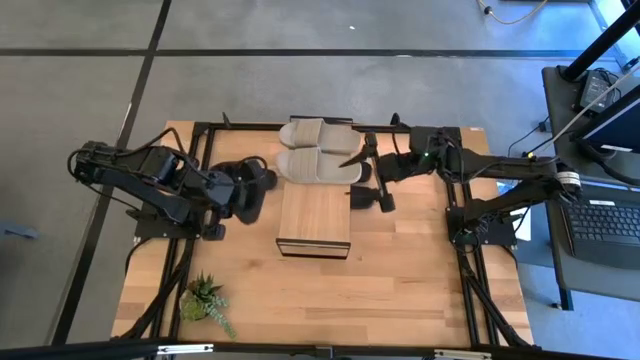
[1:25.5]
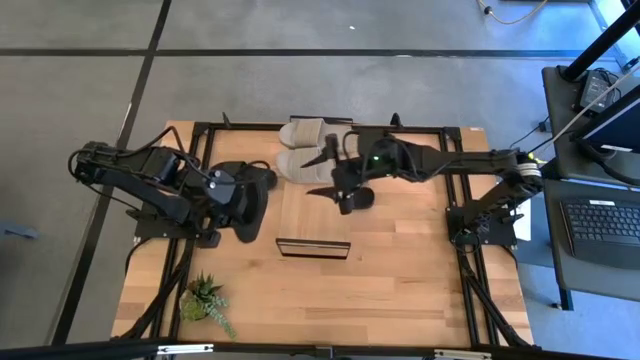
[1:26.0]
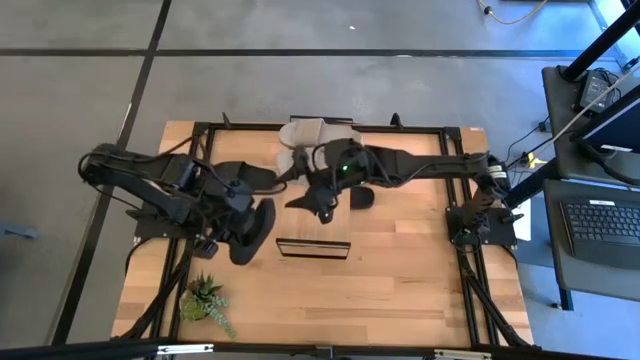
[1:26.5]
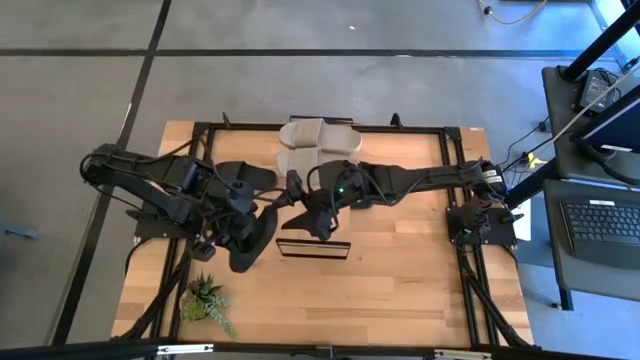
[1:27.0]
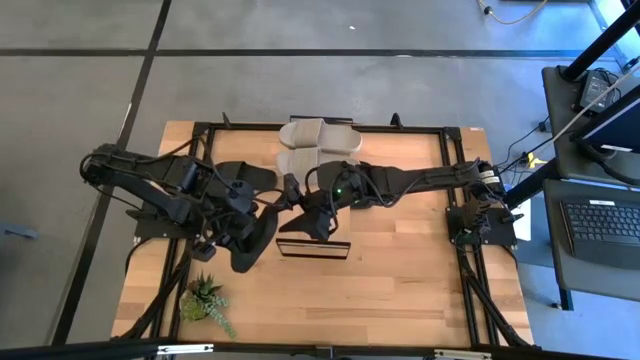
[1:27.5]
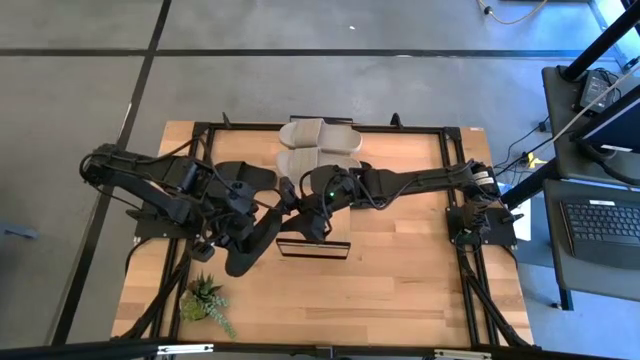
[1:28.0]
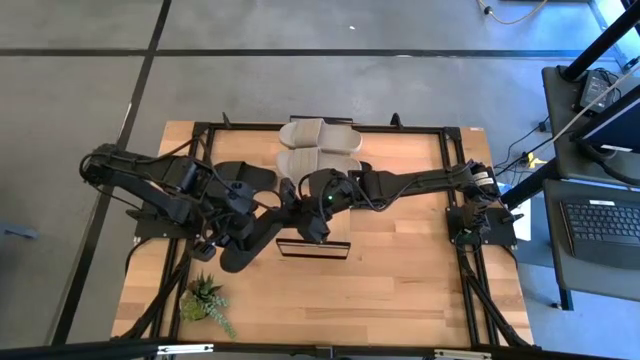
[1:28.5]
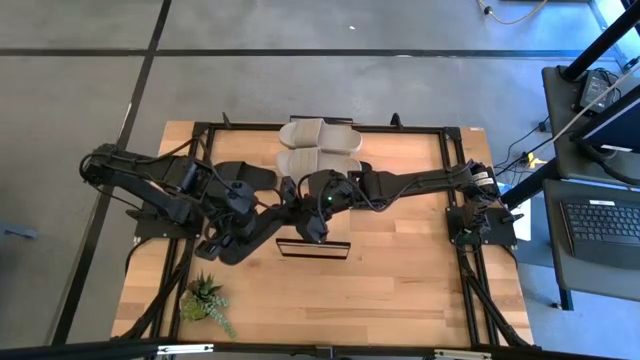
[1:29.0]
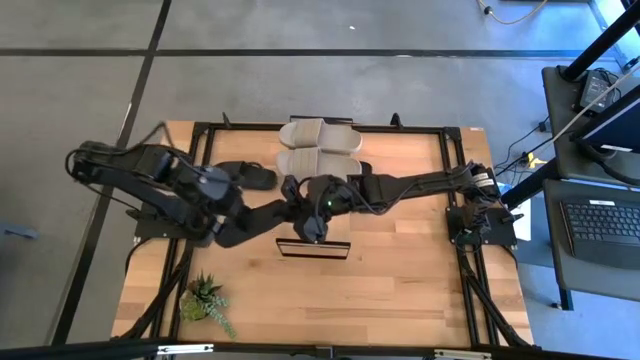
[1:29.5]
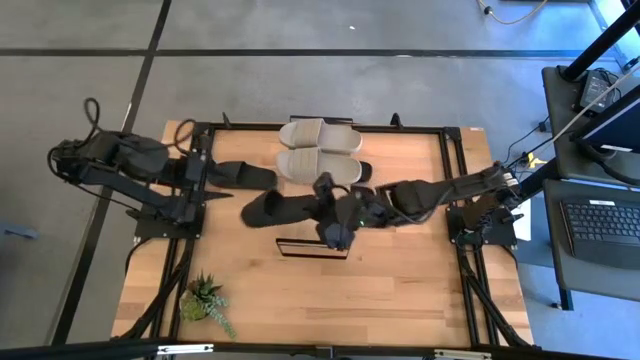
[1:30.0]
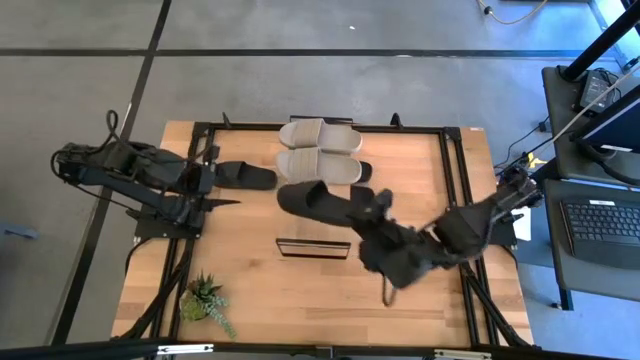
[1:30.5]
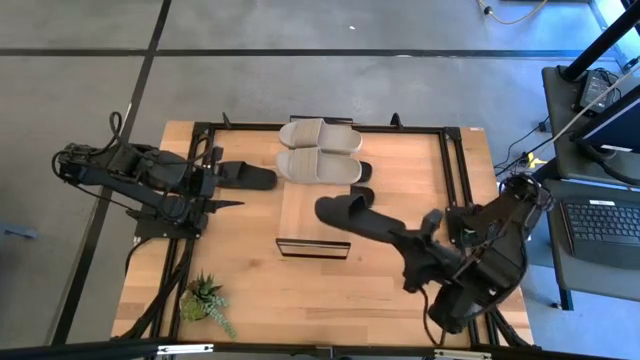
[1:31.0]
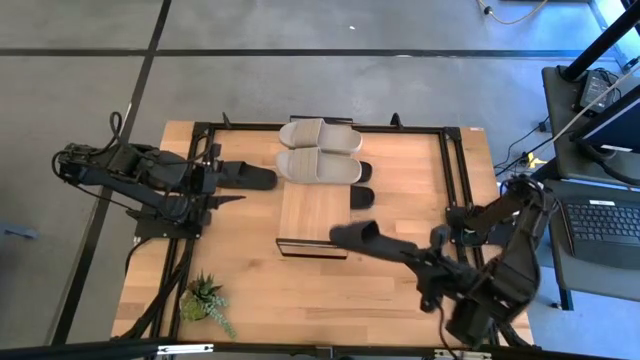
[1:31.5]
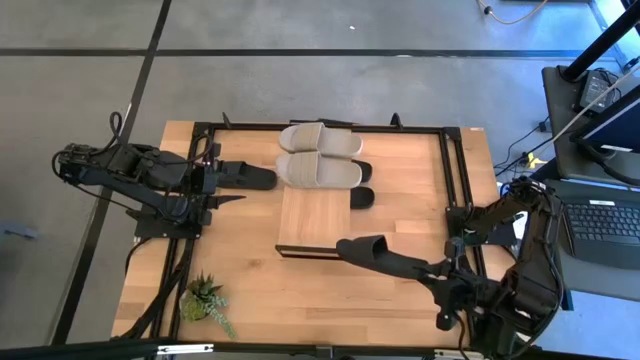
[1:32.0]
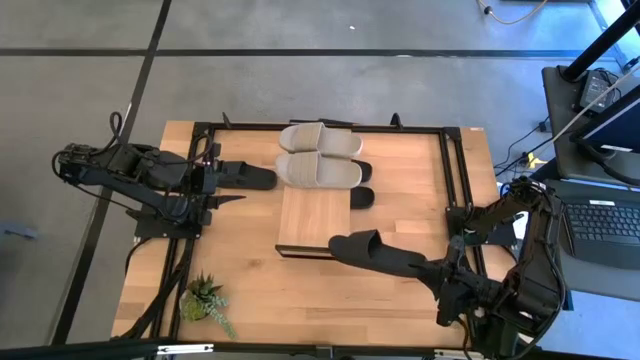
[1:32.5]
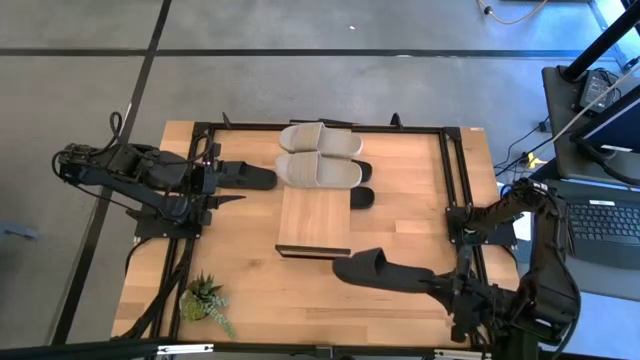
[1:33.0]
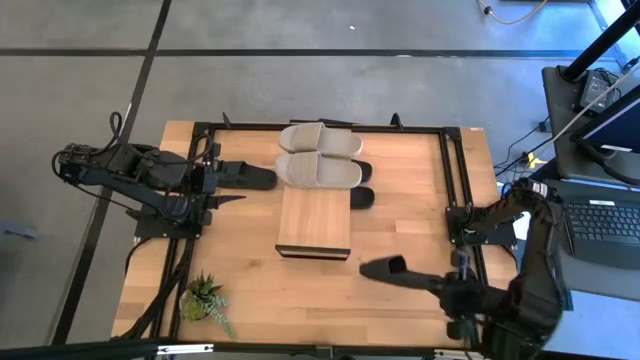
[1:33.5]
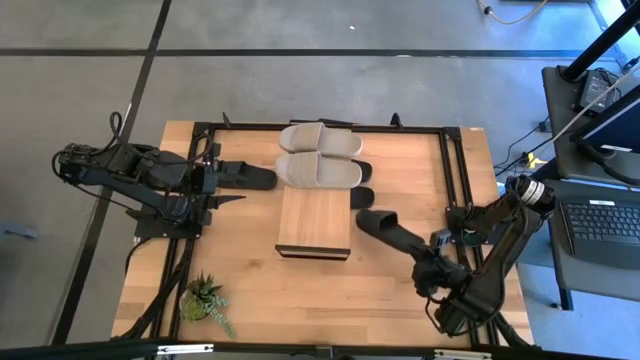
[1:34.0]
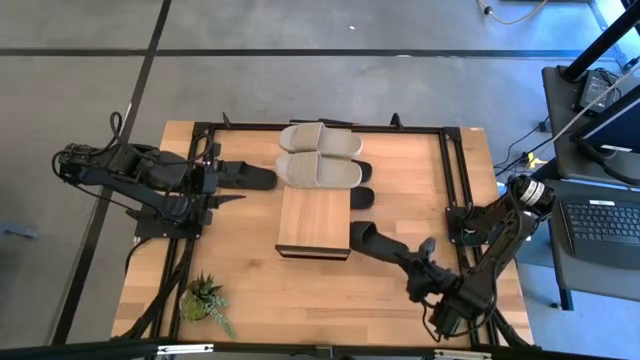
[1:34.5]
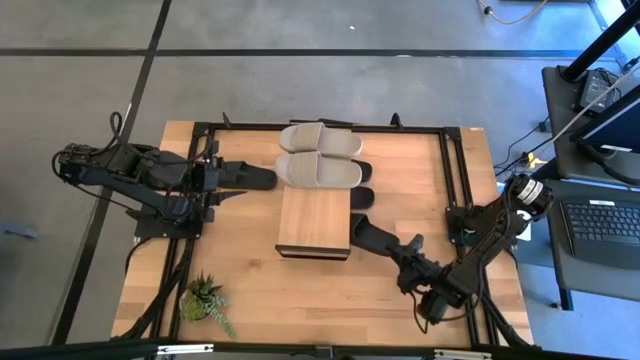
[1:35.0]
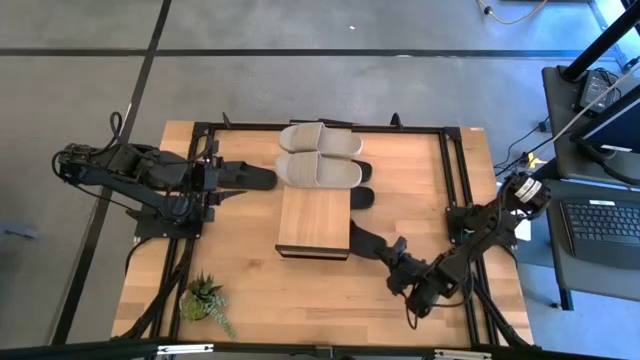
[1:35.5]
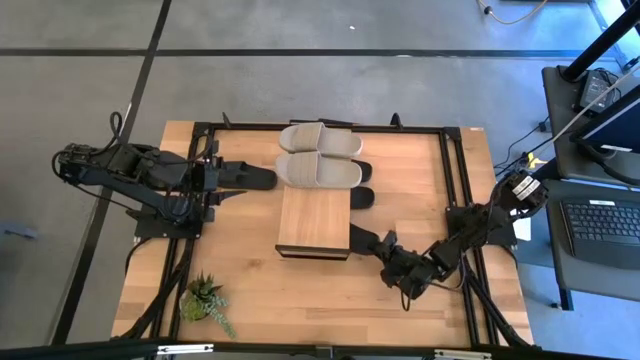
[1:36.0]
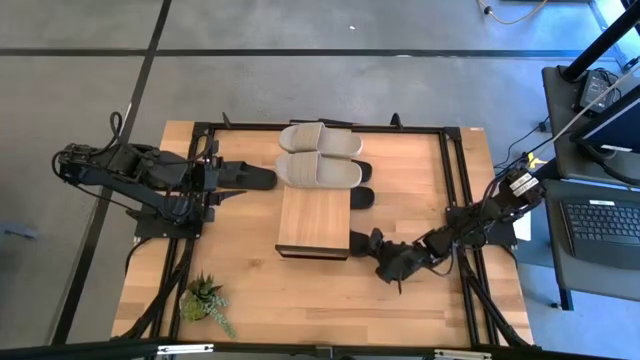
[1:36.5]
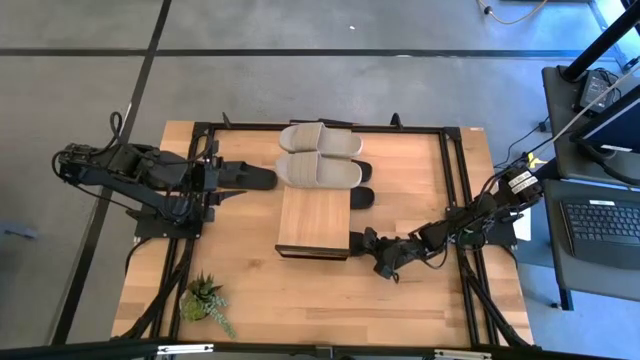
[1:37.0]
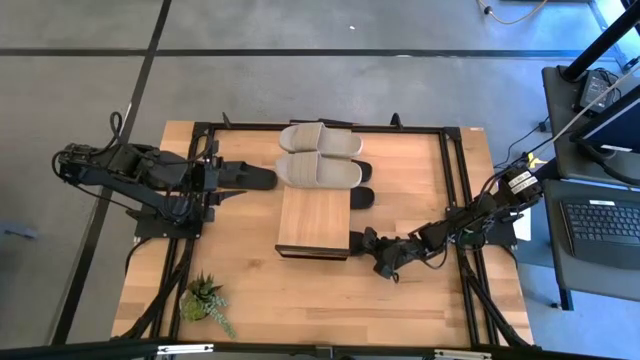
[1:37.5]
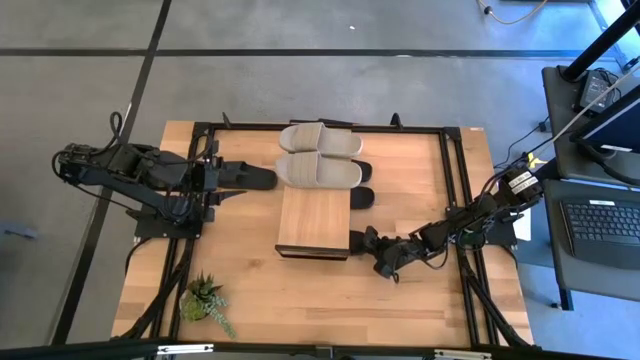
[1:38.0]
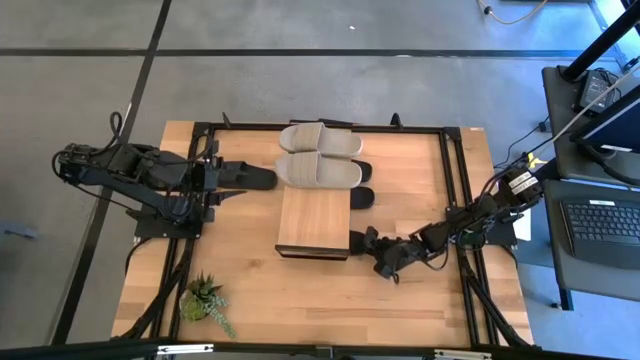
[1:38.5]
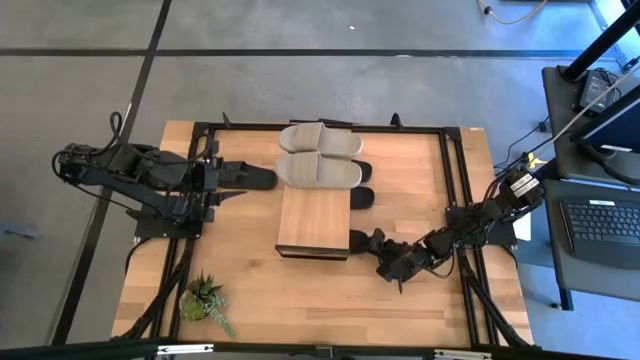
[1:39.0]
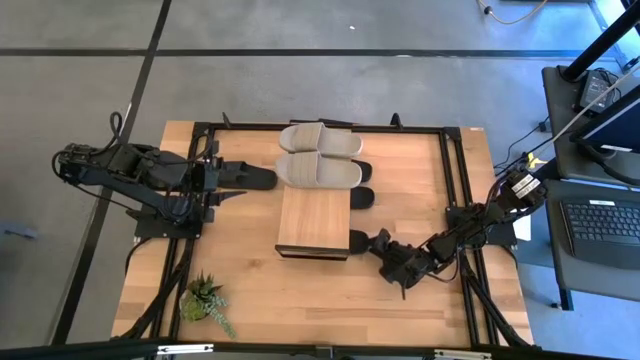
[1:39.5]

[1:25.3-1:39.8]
Task: Pick and place slides into the shelf
Put the bottom left black slide under the shelf

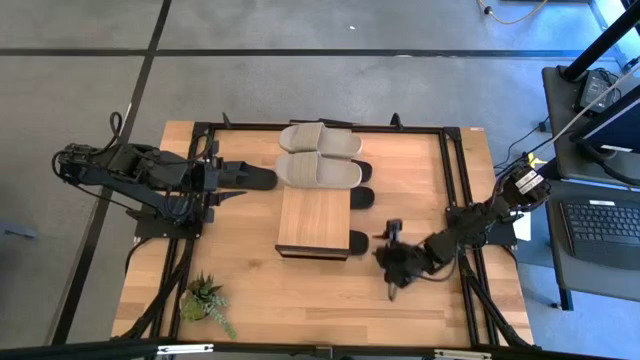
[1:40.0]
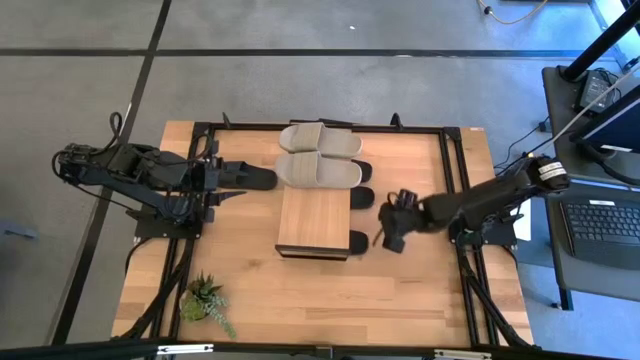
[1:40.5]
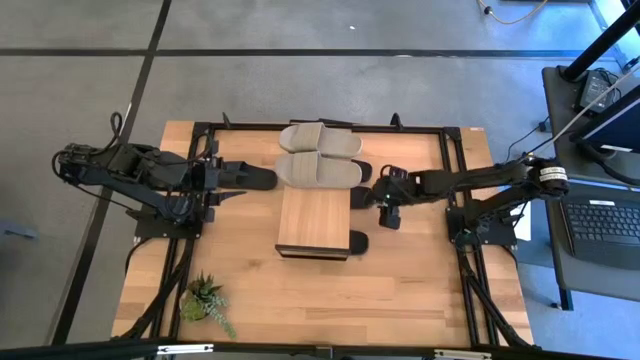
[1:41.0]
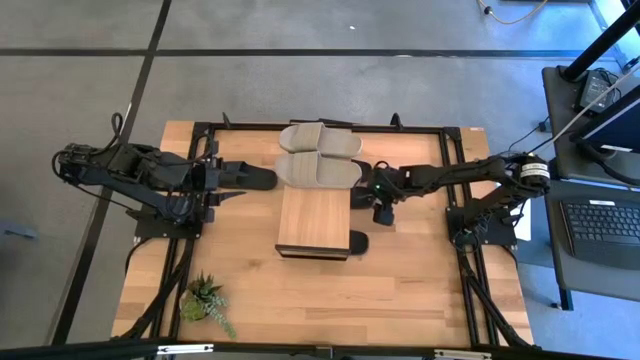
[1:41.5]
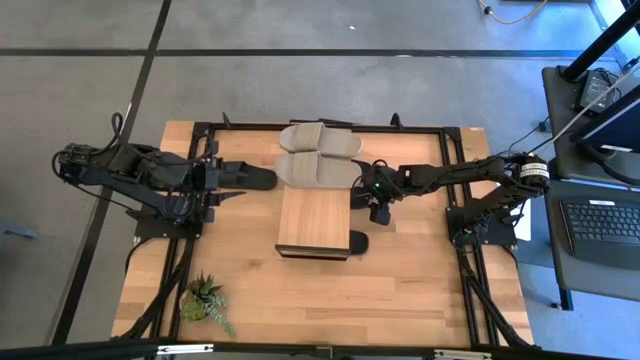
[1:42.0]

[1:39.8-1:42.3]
Adjust the black slide under the shelf

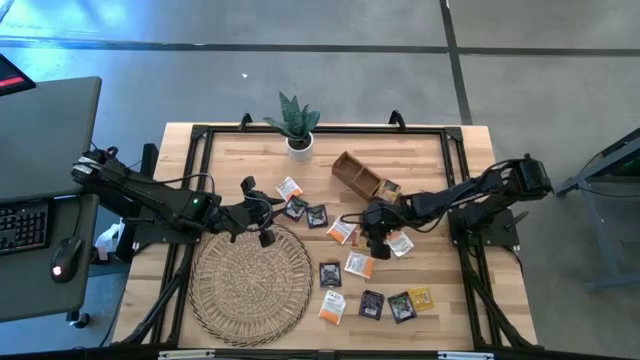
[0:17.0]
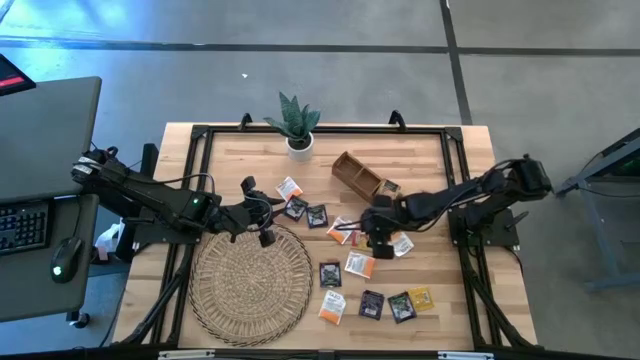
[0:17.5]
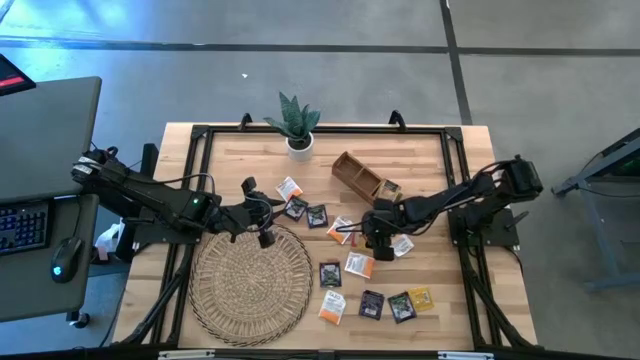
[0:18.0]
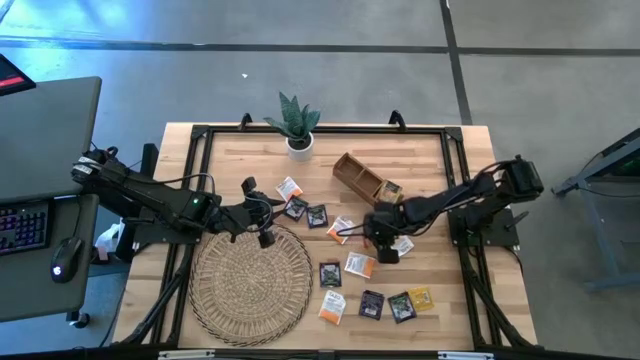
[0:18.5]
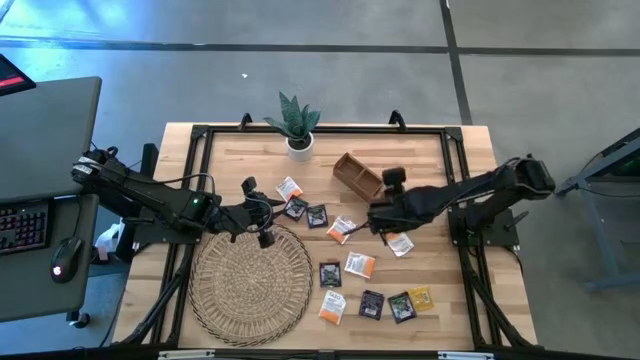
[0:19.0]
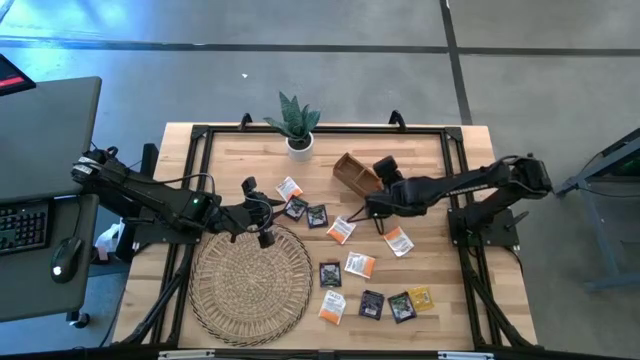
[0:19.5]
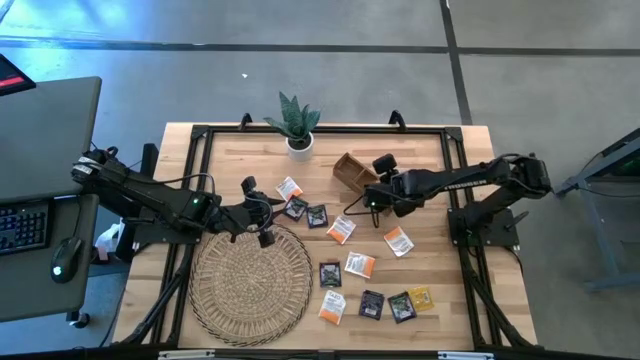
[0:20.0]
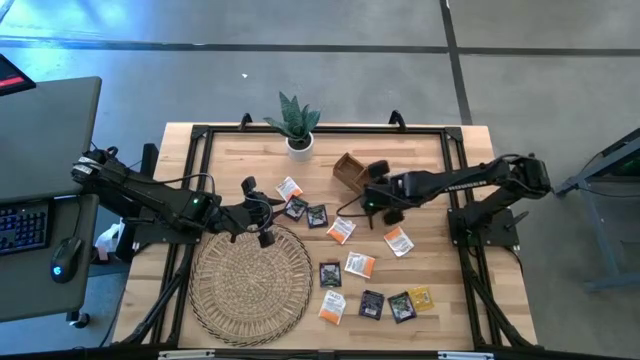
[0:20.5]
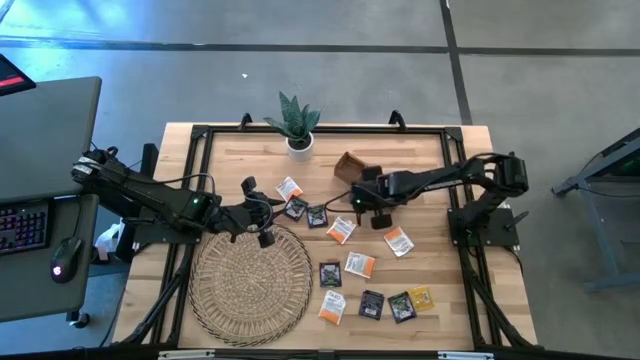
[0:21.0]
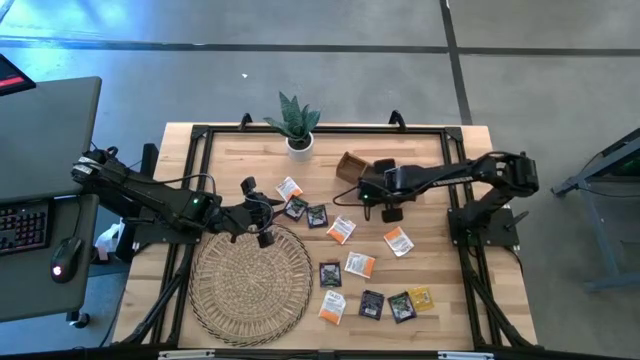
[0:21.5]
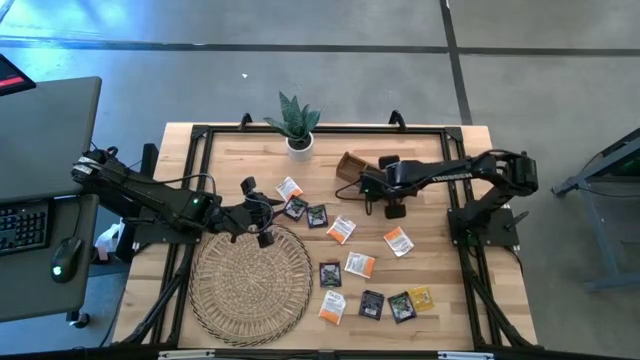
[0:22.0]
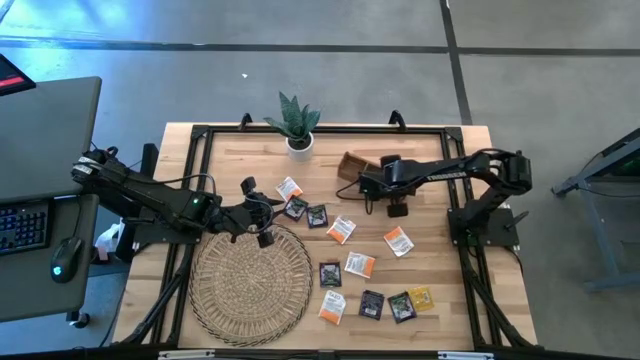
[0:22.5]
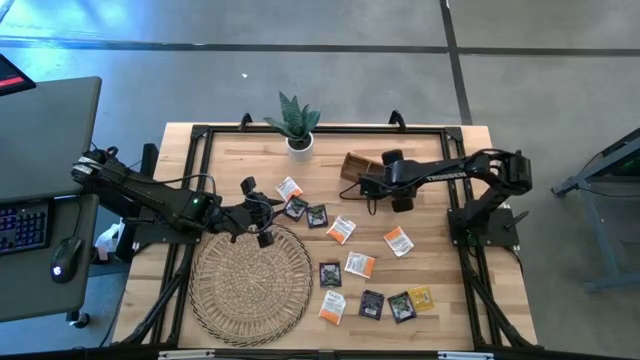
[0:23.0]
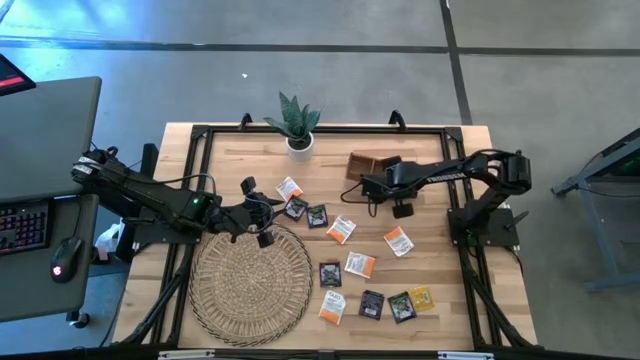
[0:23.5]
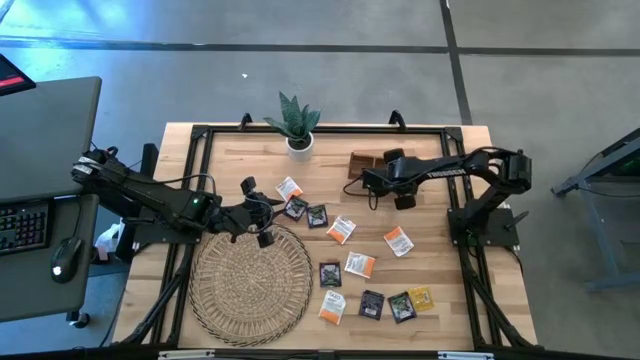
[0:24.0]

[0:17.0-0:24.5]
Task: Pick & Place Tea
Put the orange tea bag into the right section of the wooden organizer
